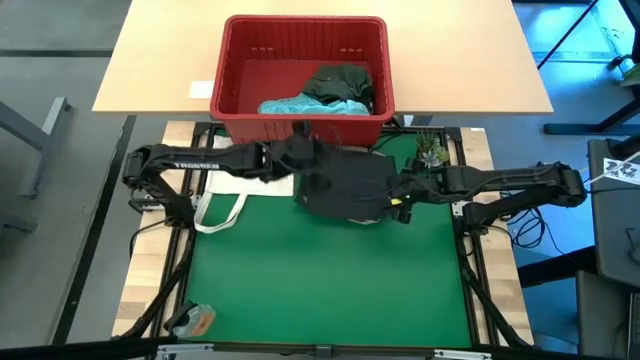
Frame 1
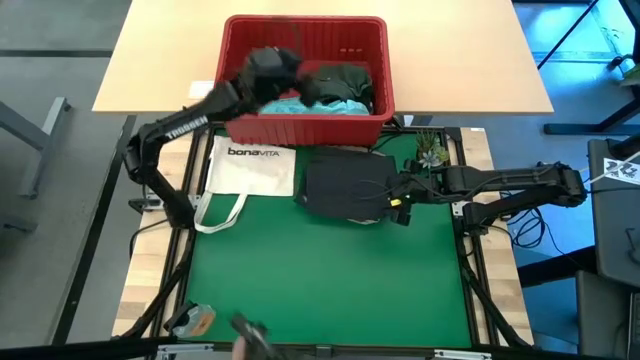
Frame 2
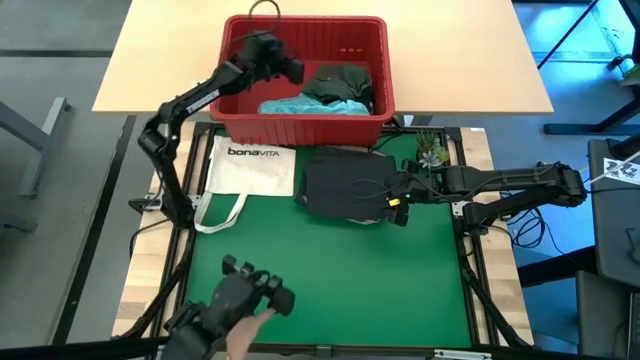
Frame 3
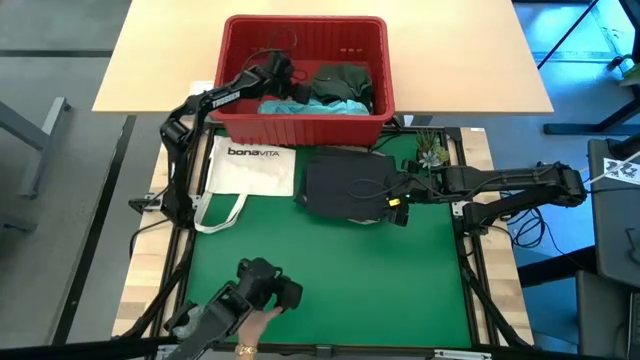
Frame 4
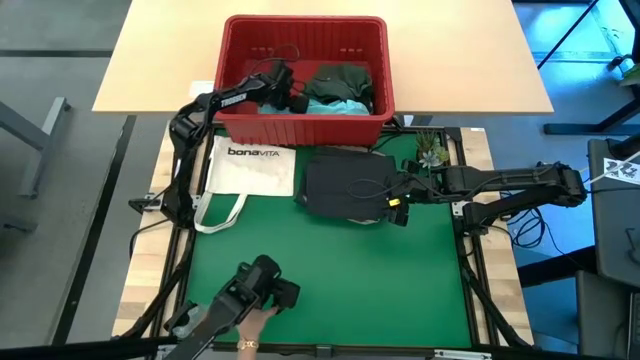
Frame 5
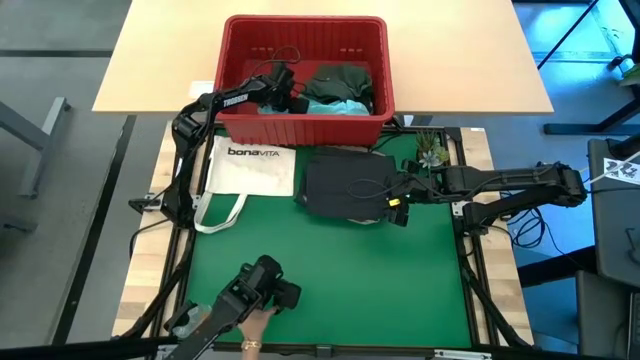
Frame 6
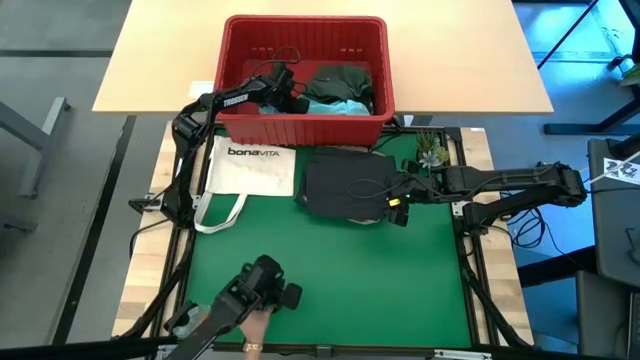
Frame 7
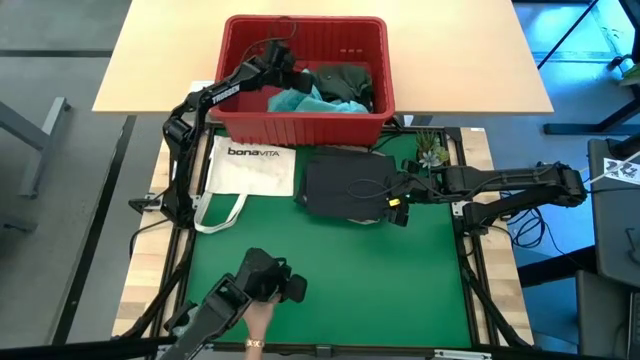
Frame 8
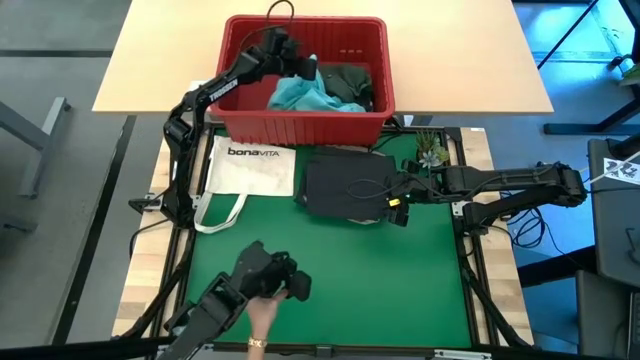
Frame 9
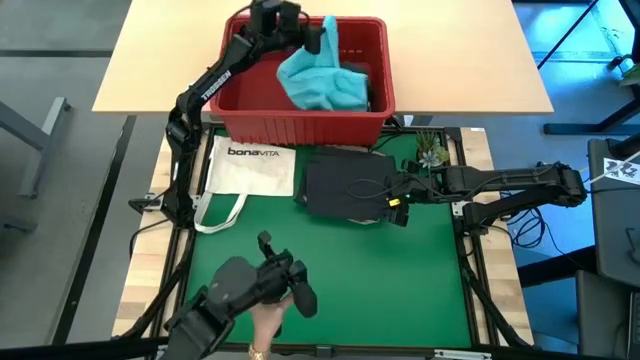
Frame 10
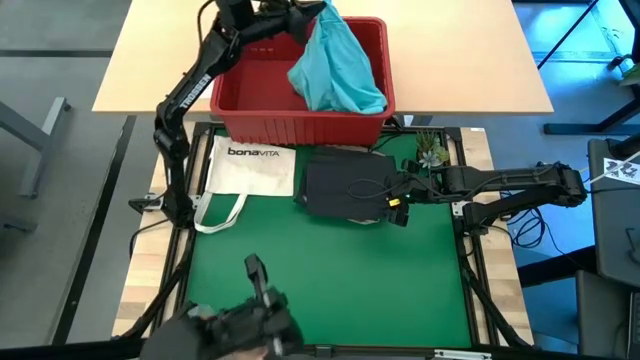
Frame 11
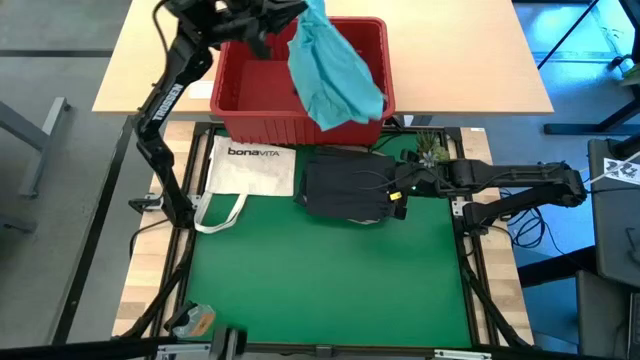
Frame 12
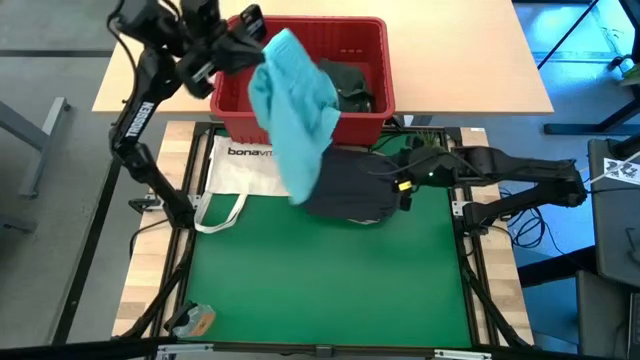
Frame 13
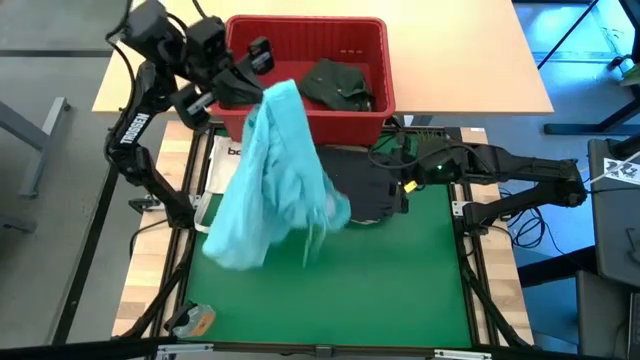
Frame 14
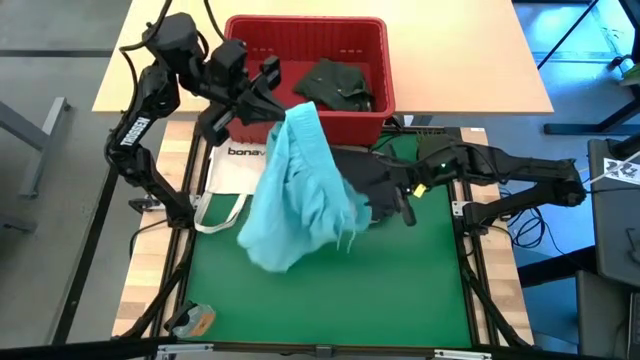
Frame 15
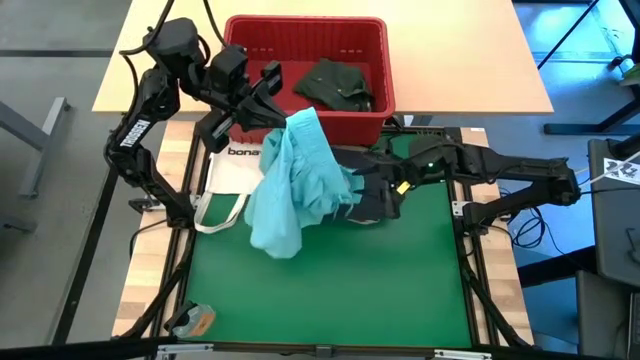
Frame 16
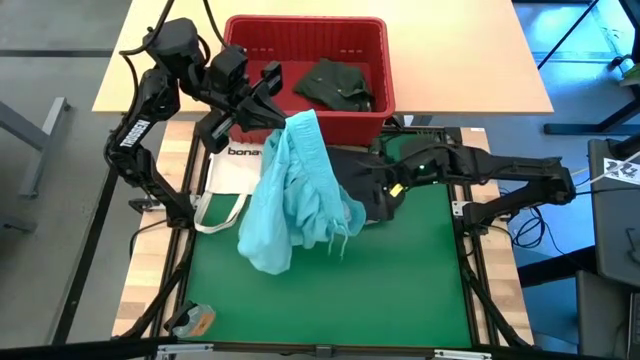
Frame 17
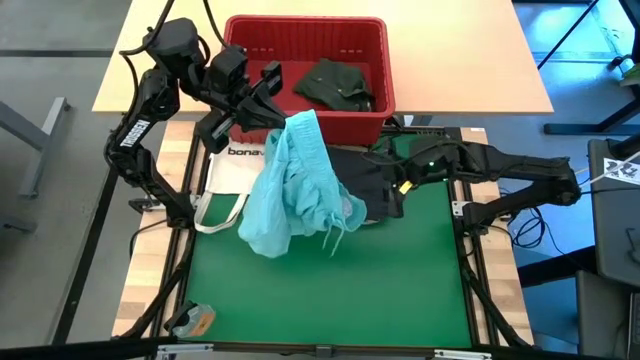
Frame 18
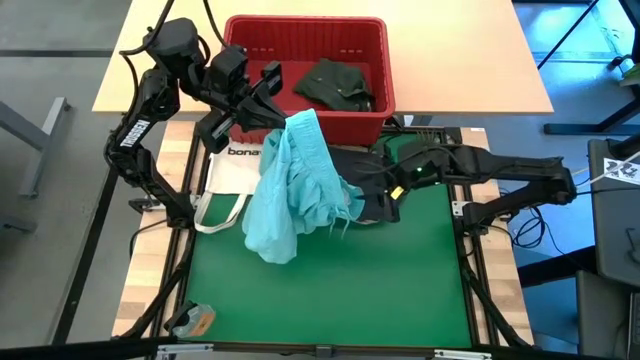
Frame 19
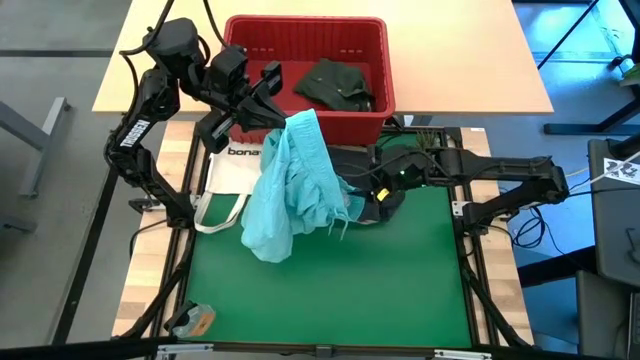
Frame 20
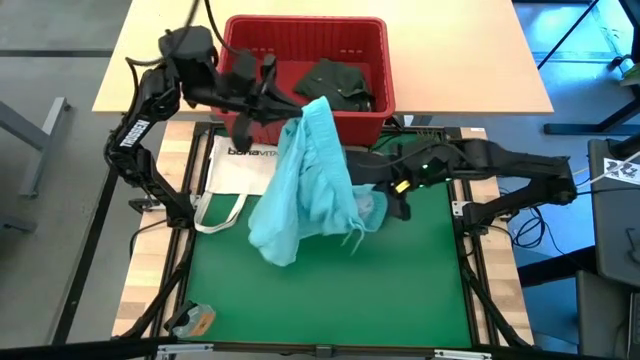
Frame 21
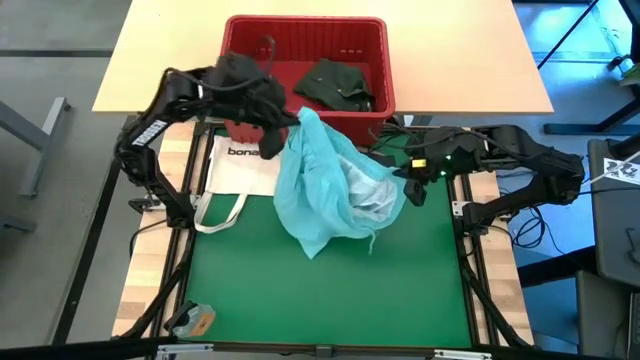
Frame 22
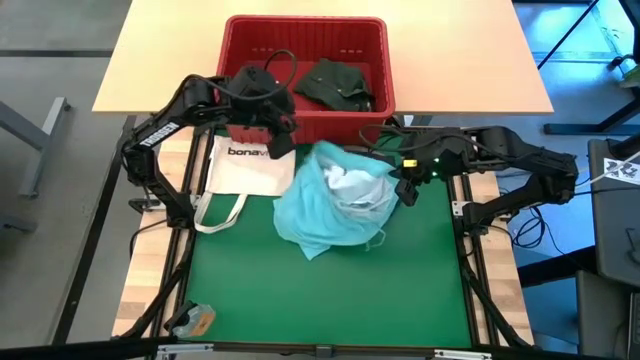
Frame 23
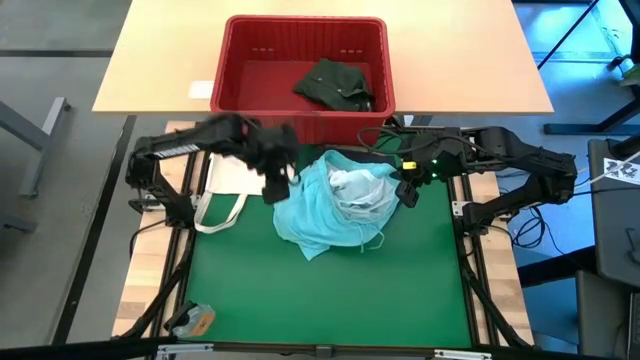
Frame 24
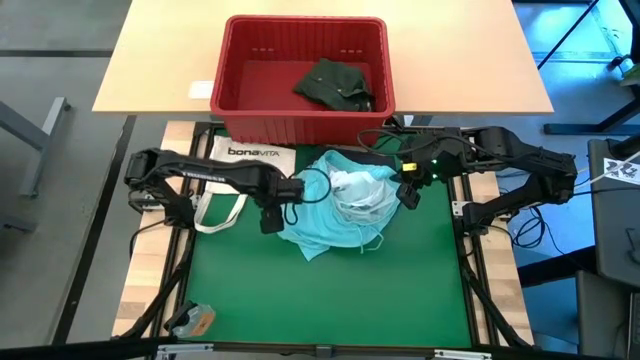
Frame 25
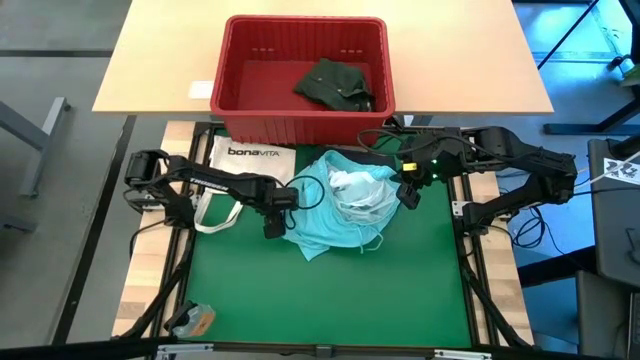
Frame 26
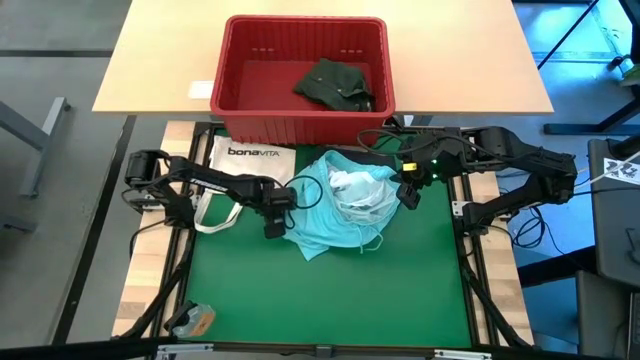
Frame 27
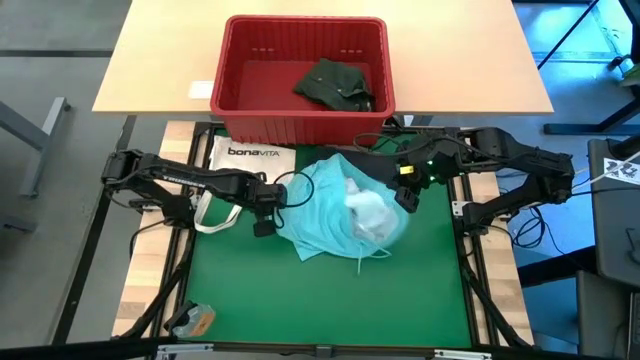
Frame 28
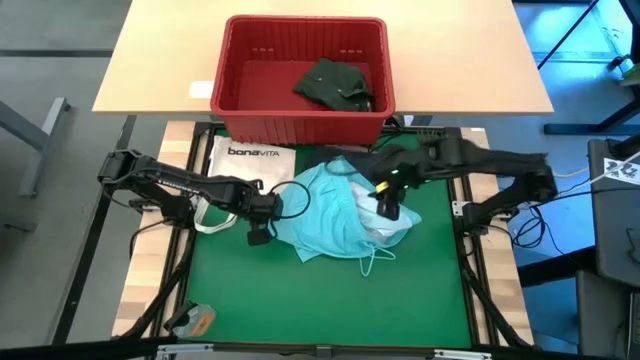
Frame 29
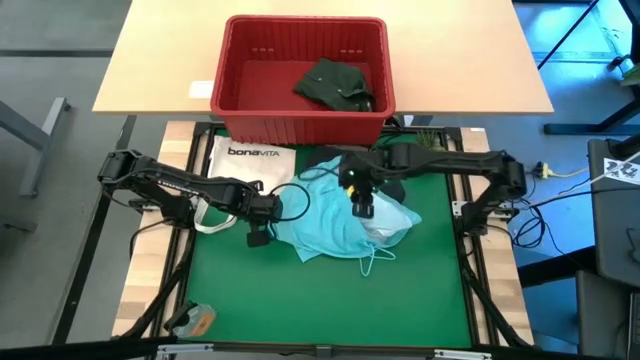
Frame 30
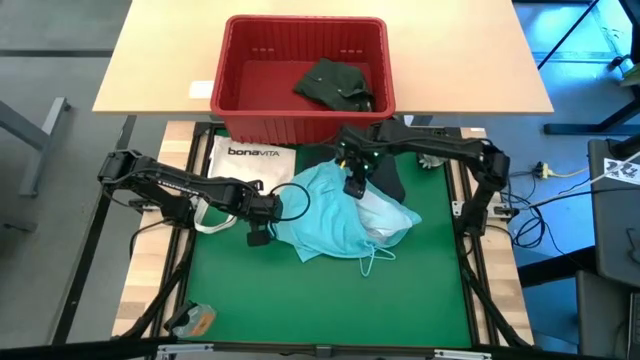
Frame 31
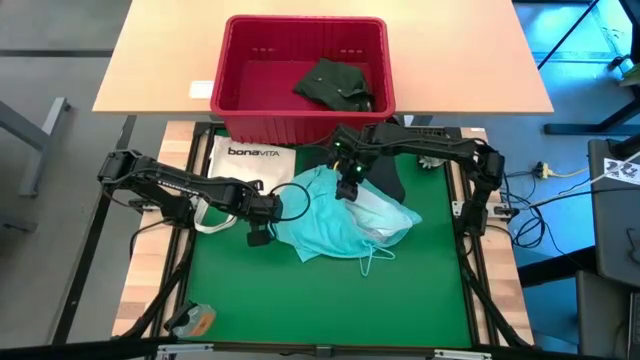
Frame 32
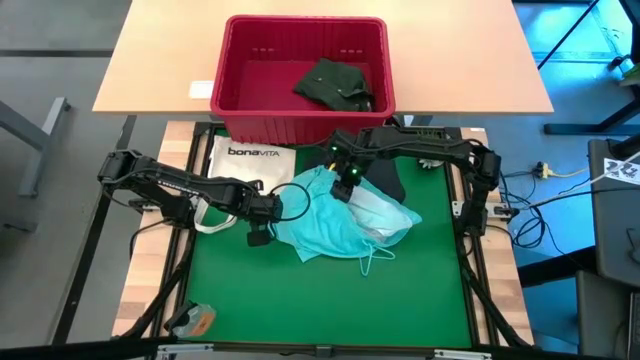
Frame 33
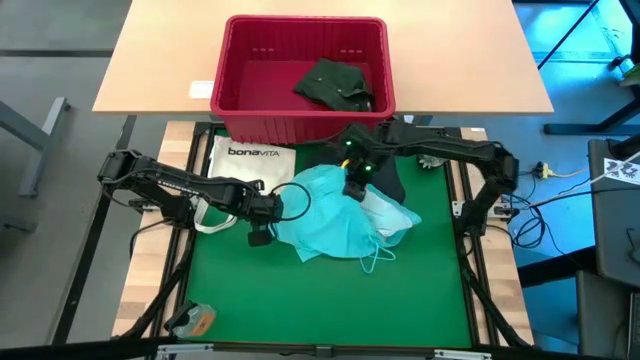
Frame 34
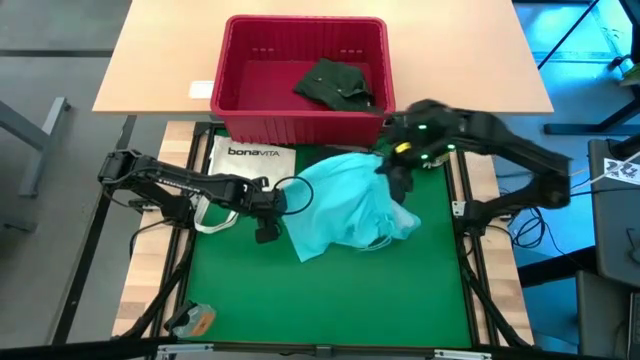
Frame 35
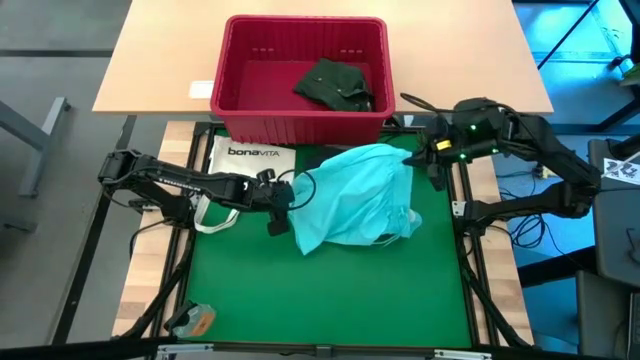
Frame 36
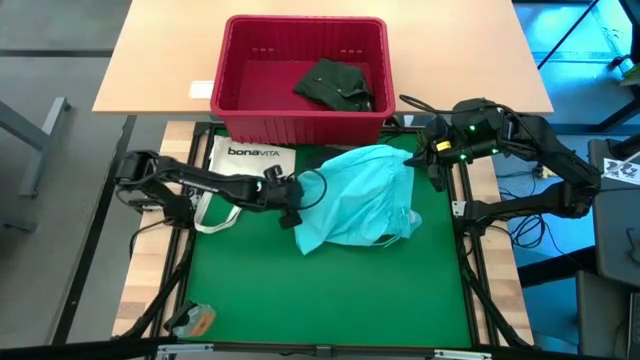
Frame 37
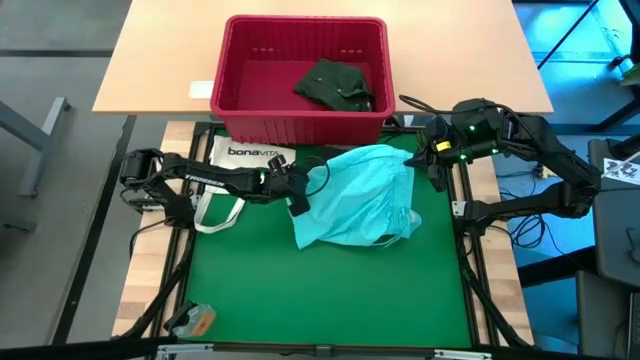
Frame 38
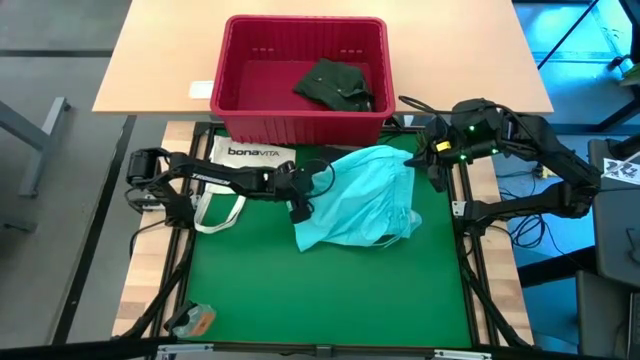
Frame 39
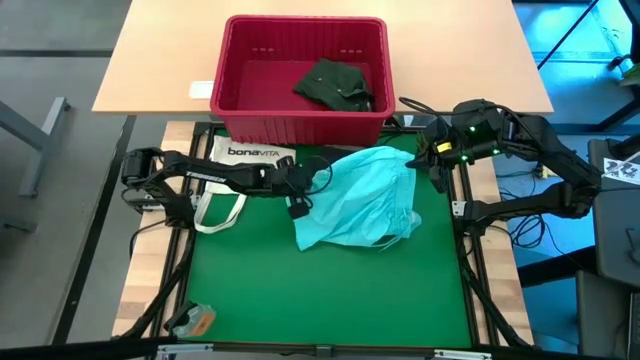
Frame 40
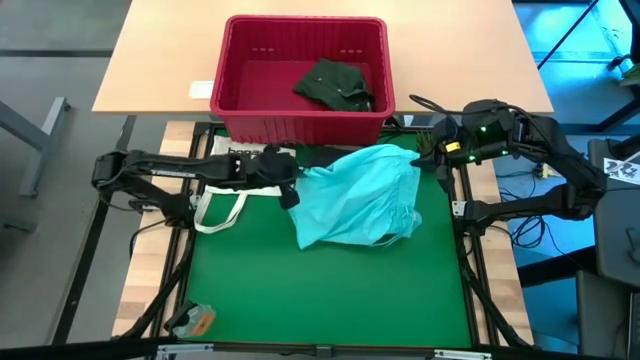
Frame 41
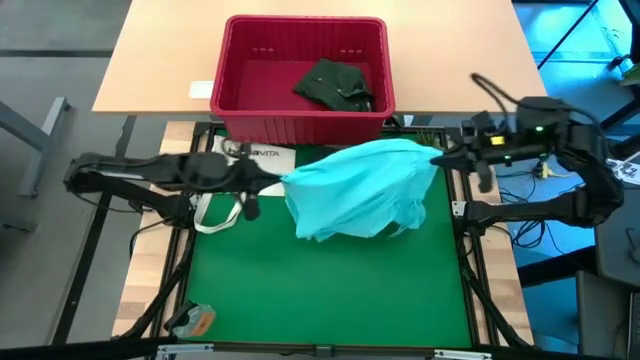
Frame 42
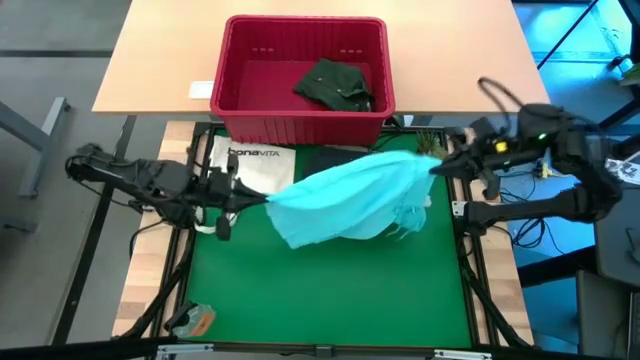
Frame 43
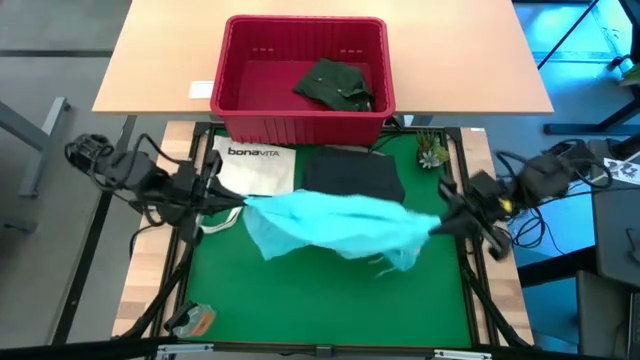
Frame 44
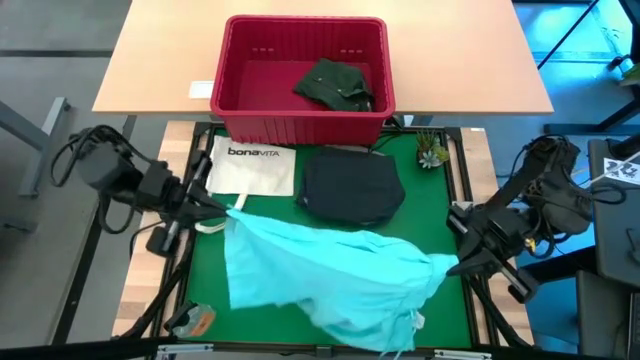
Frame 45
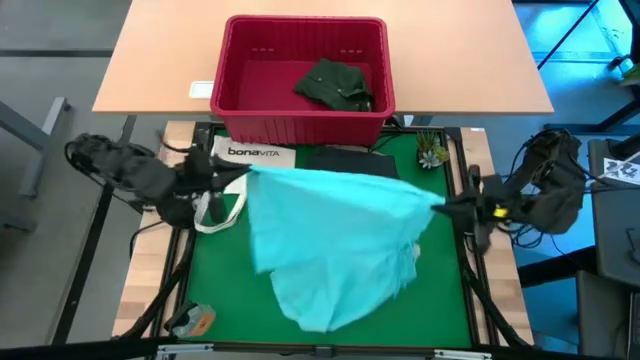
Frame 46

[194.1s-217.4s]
Task: Fold Laundry from Bin
Remove the light blue shorts from the red laundry bin
